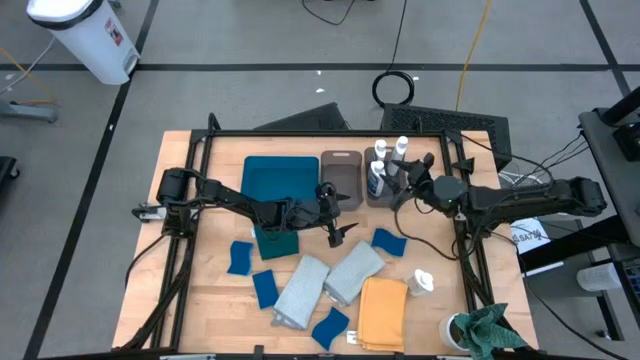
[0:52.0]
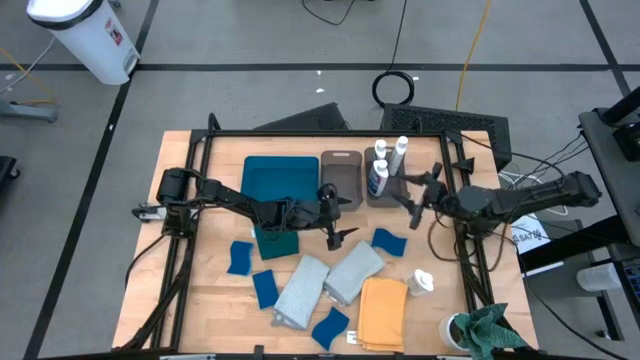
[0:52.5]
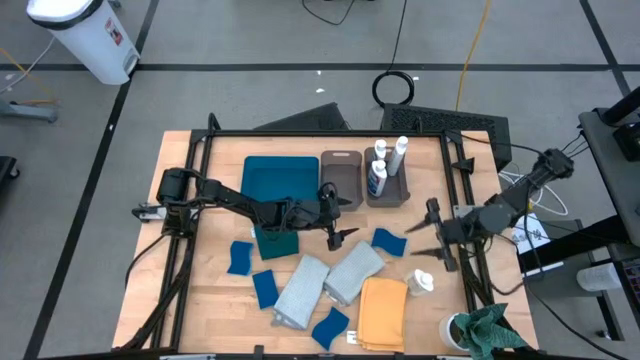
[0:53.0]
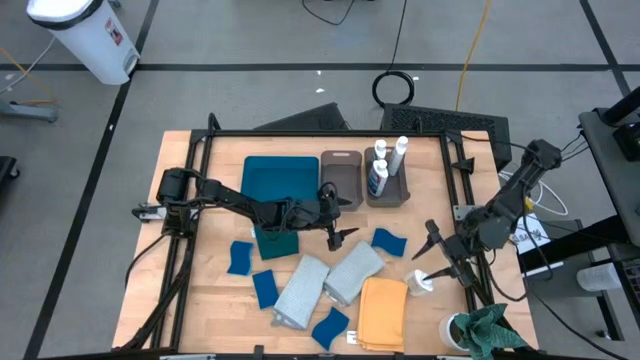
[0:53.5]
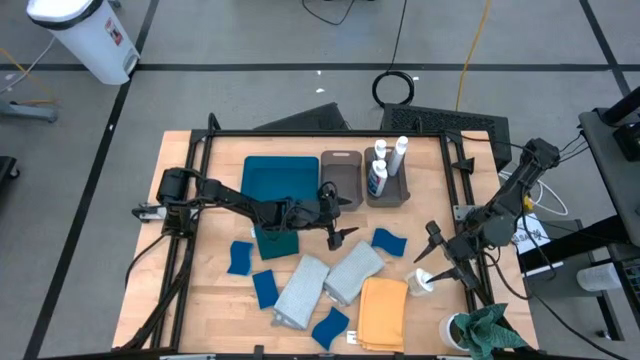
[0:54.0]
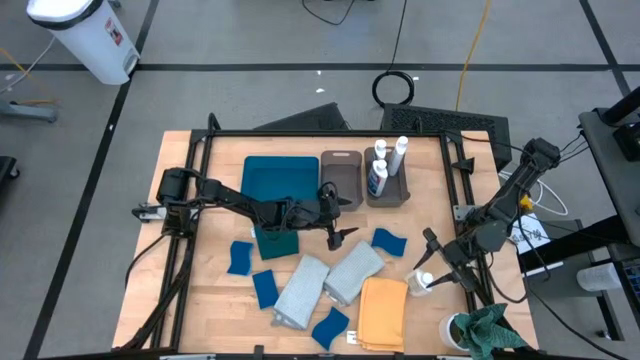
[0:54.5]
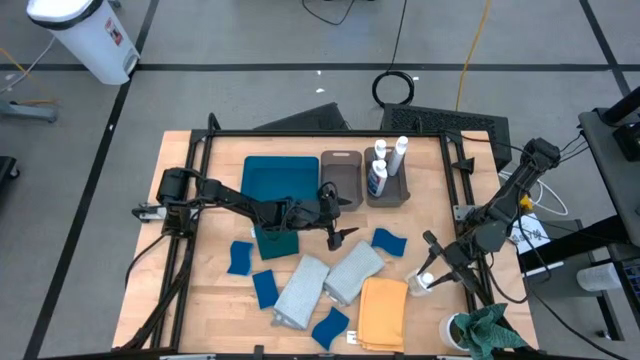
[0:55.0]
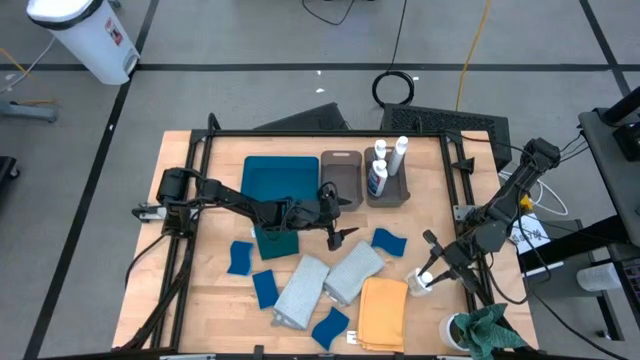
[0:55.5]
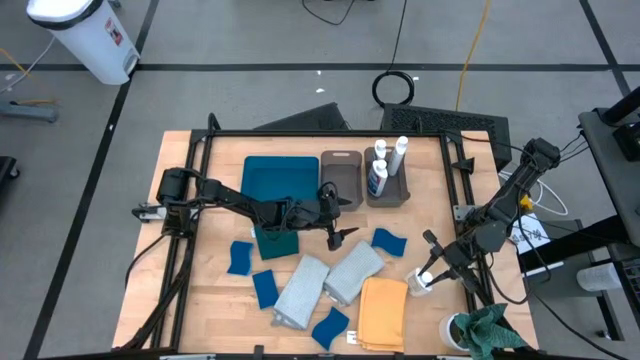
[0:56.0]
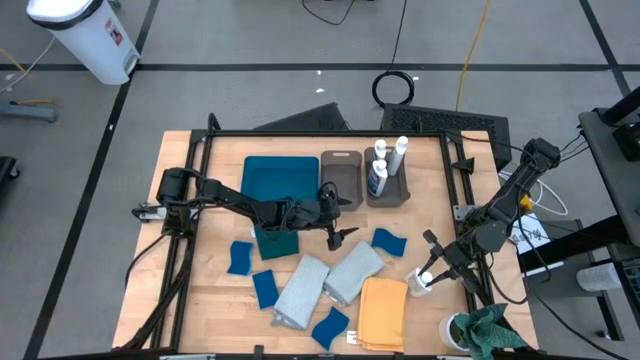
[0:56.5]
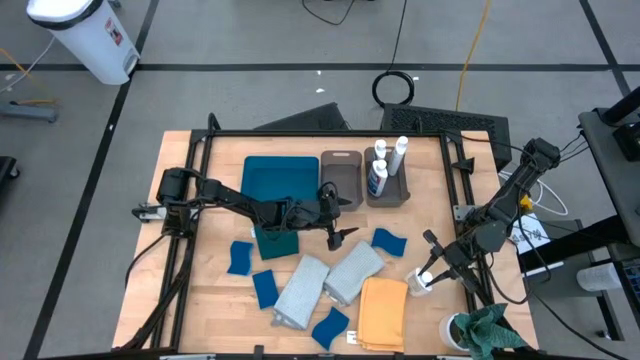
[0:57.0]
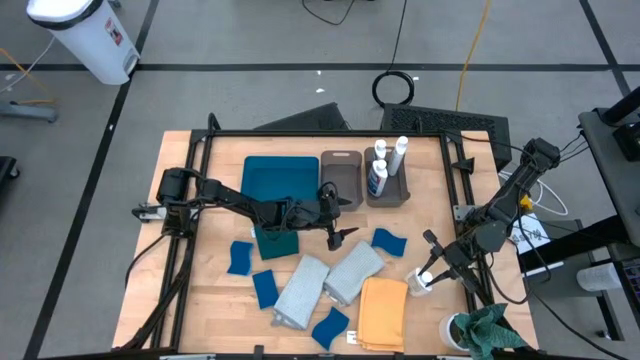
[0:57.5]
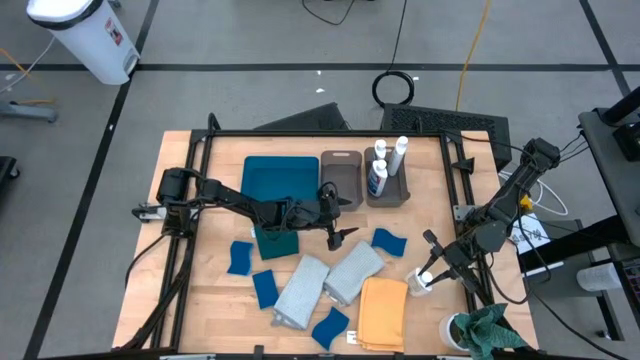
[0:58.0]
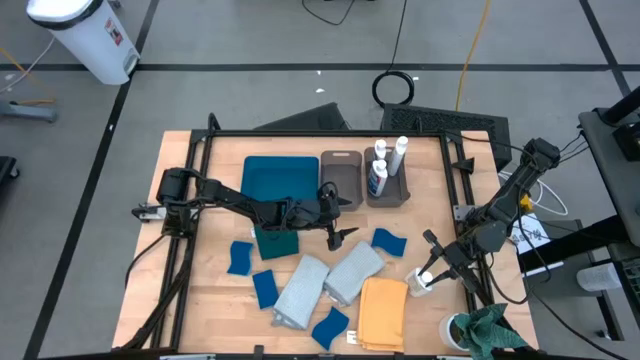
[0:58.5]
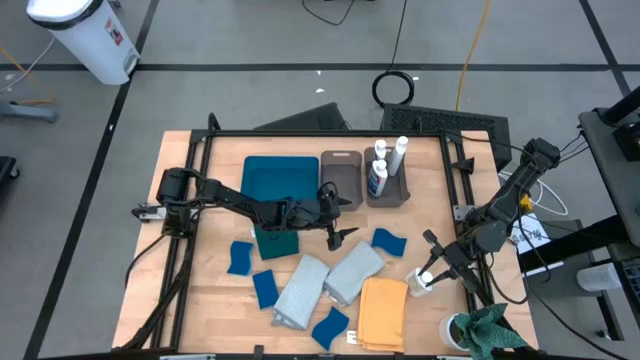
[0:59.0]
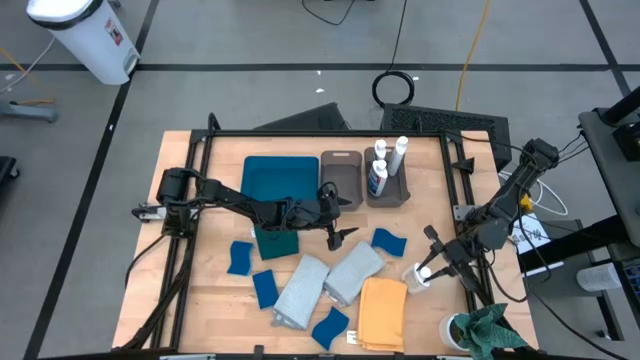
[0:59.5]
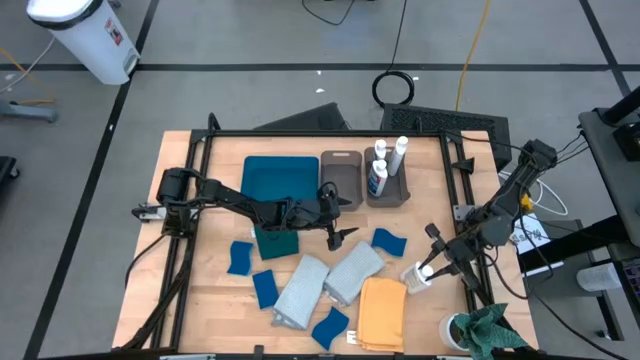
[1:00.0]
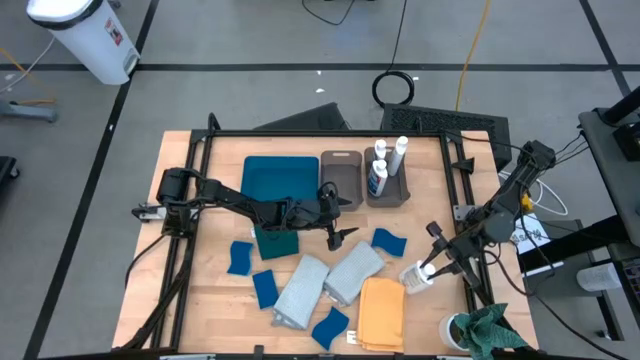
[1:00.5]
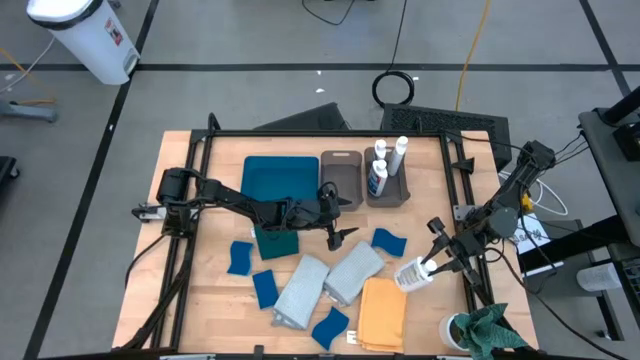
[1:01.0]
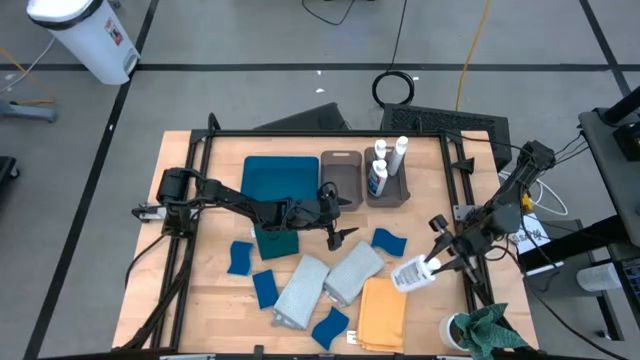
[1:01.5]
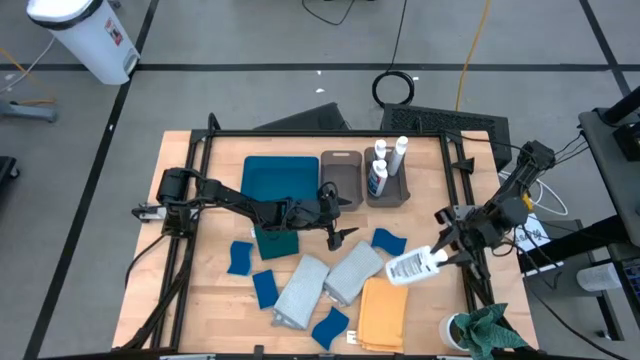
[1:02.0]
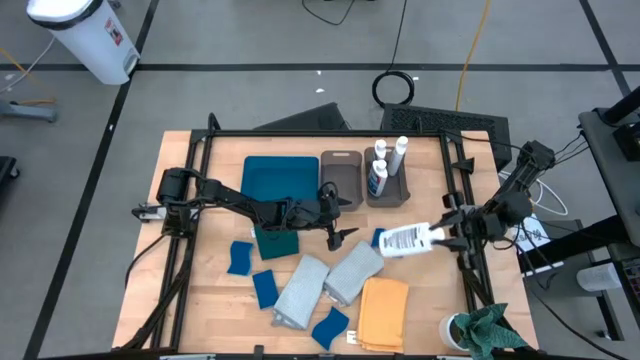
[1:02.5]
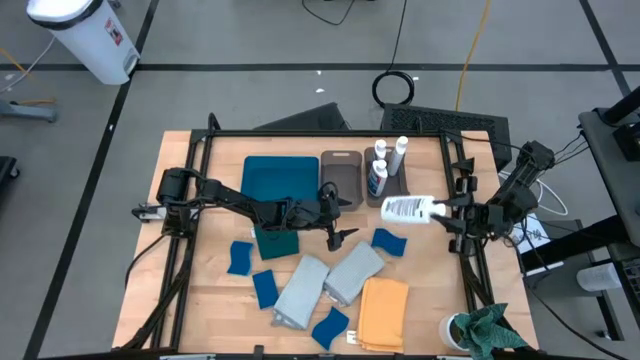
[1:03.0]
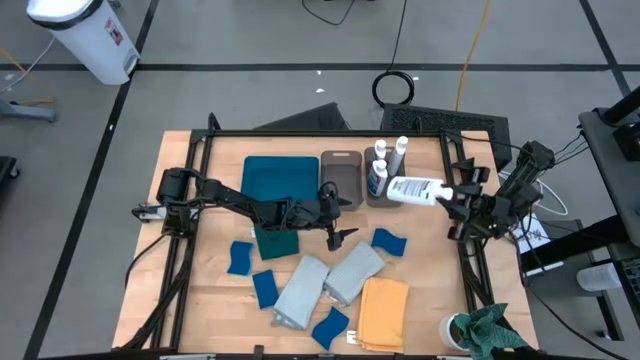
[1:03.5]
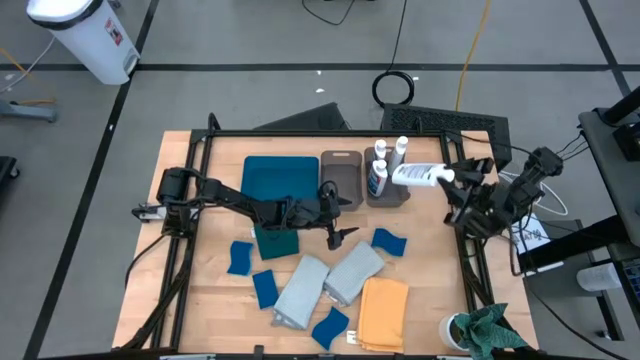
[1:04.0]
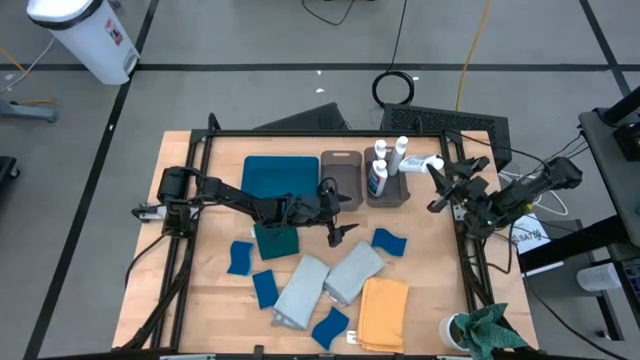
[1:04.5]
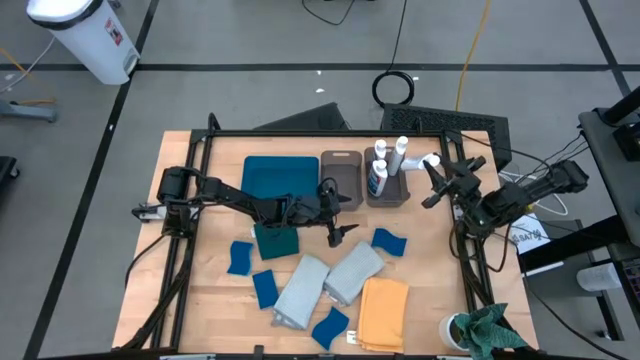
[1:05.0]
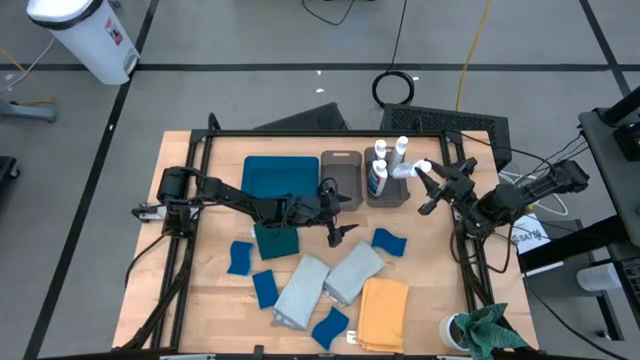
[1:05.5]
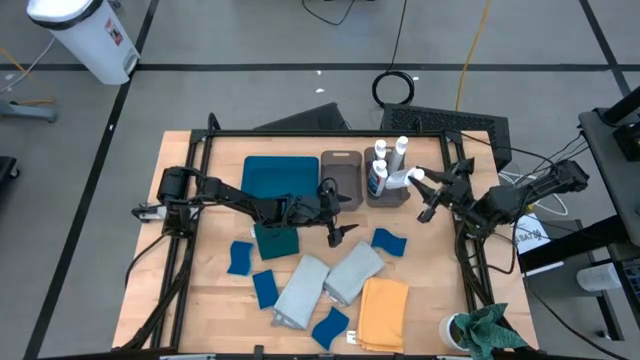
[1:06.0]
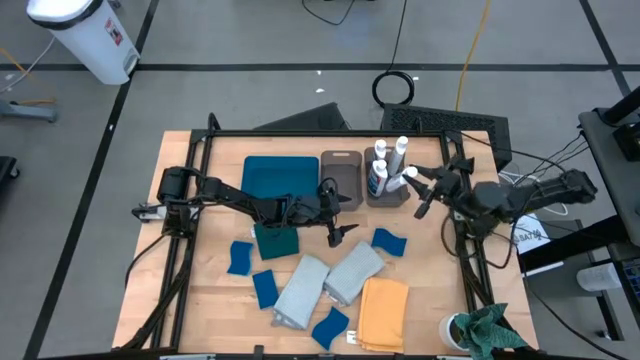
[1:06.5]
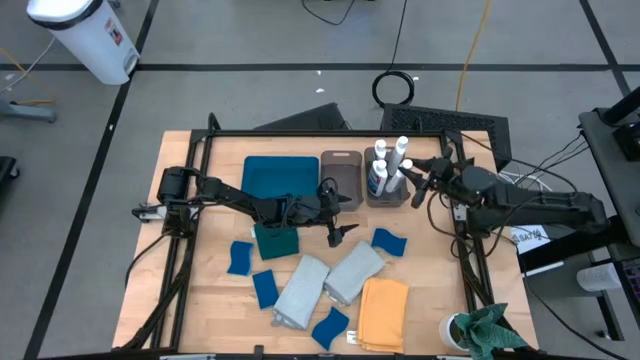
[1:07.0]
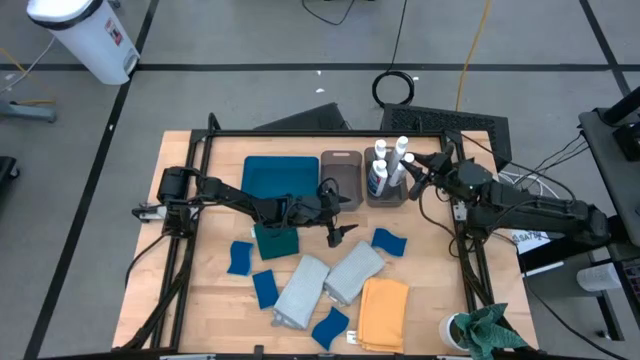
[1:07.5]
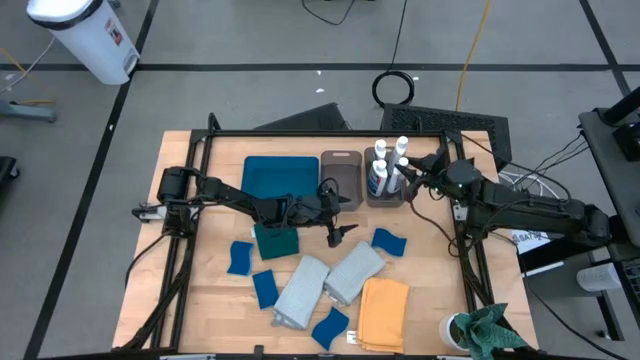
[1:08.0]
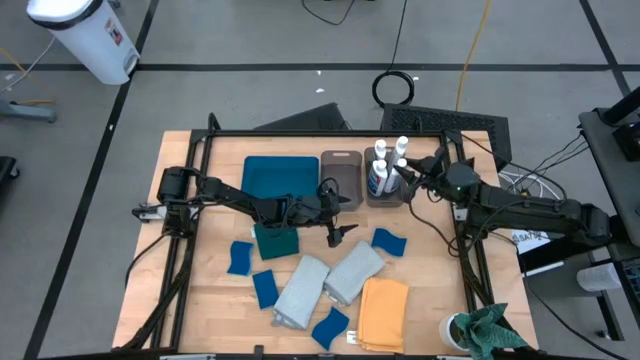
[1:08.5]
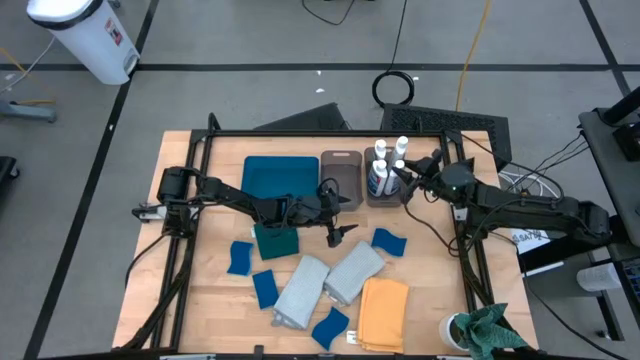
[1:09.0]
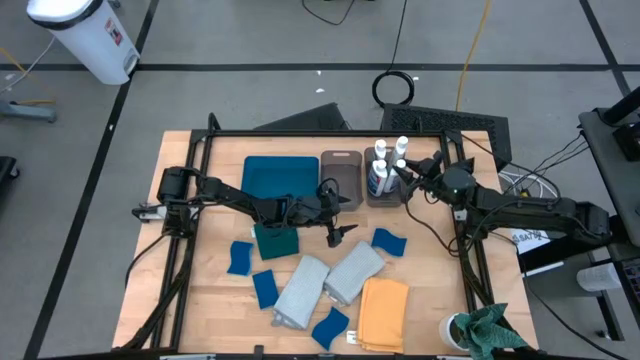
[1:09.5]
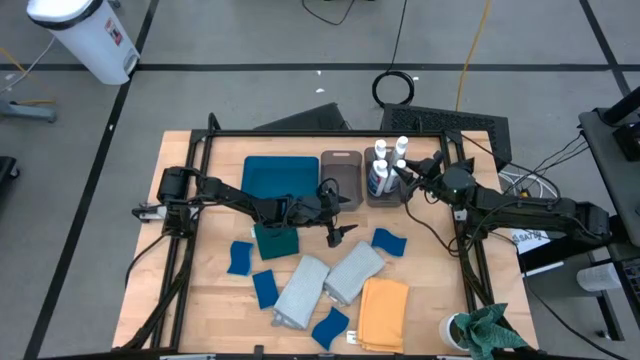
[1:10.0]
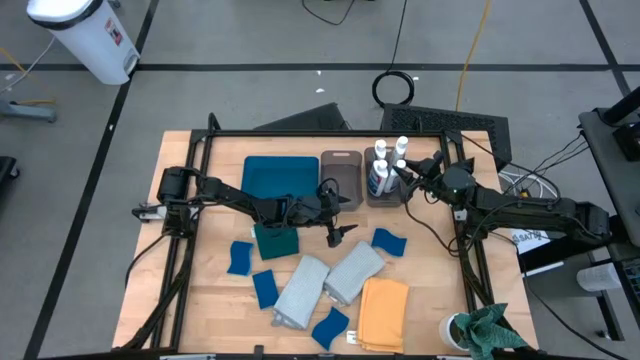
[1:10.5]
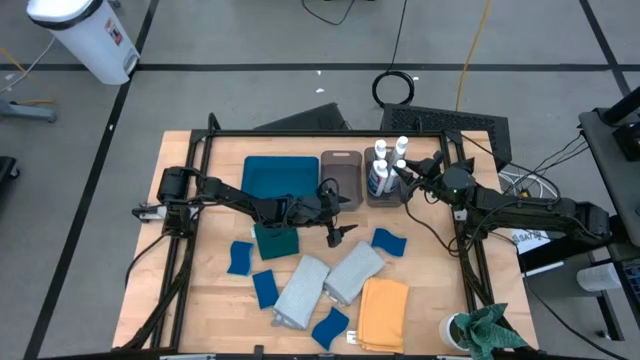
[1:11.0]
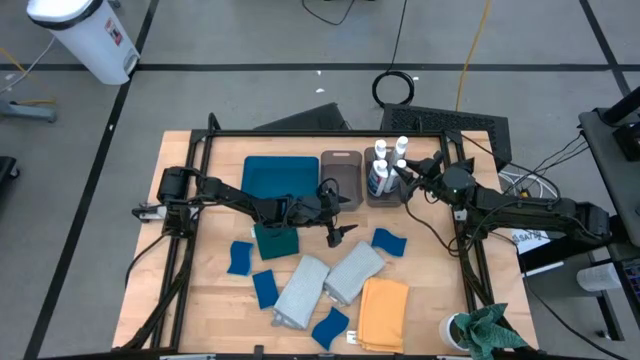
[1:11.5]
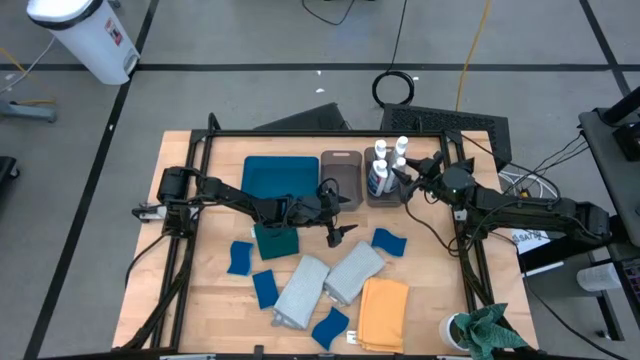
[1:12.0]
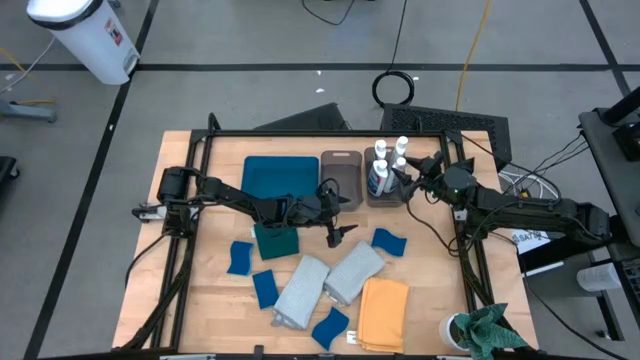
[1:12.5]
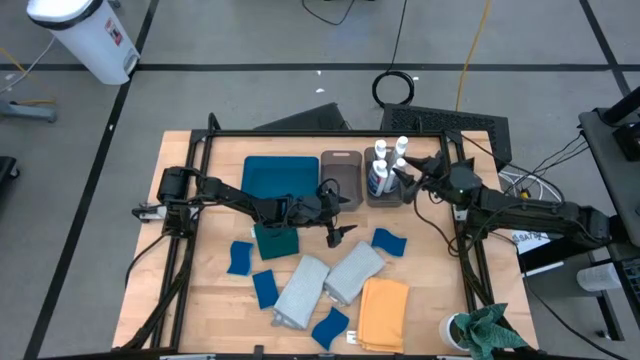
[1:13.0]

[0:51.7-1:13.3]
Task: Pick & Place Kitchen Items
Put the white plastic restorer bottle into the right black bin

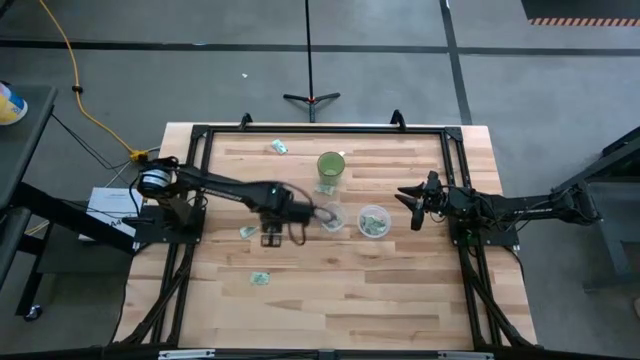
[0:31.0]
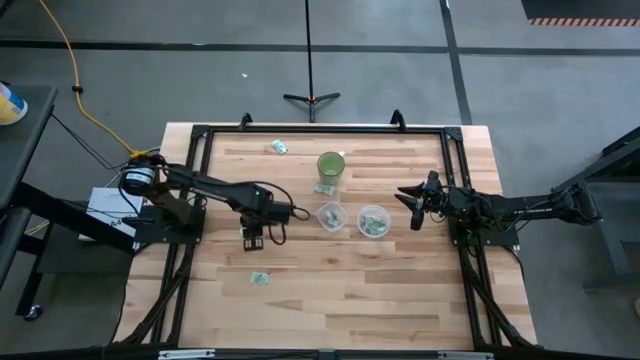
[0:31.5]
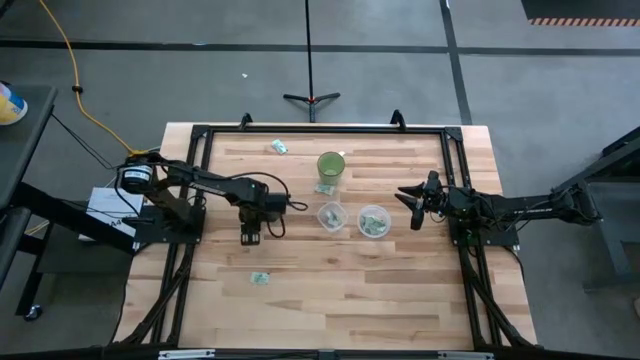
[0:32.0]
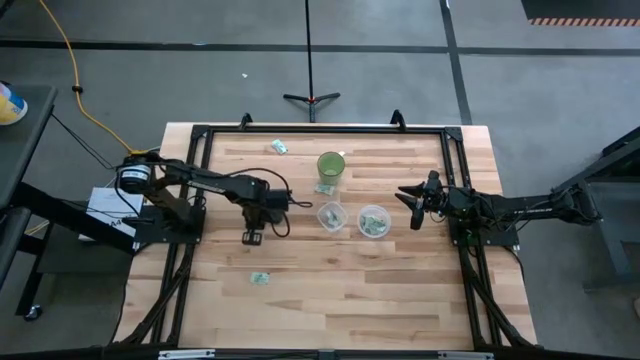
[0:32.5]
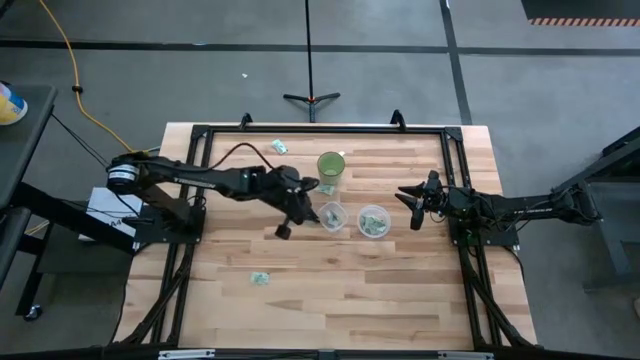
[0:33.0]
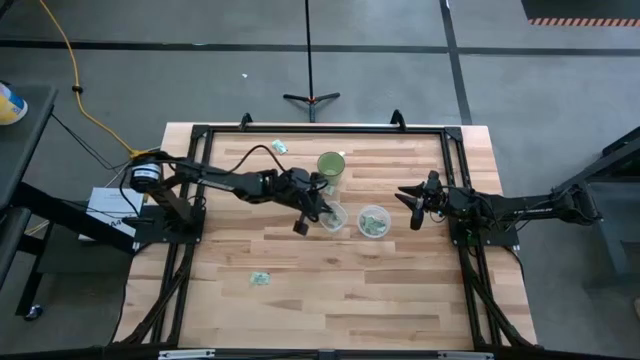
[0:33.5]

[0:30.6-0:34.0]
Task: Pick and place items into bin
Put the stevia packet into the left transparent bin
